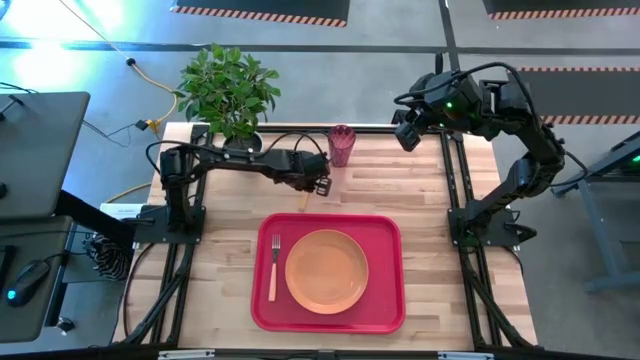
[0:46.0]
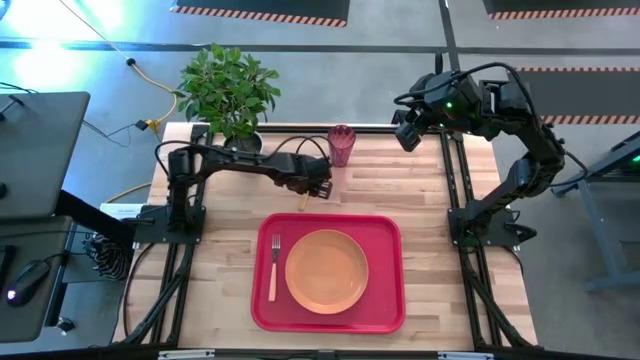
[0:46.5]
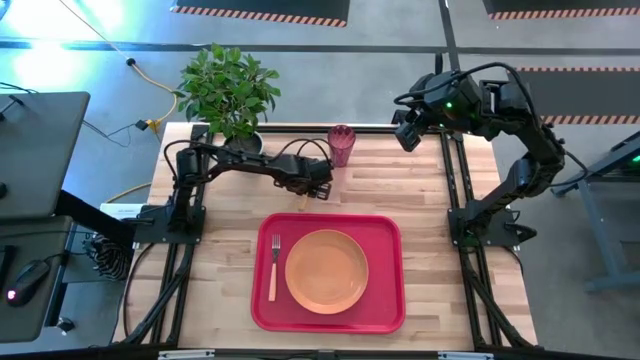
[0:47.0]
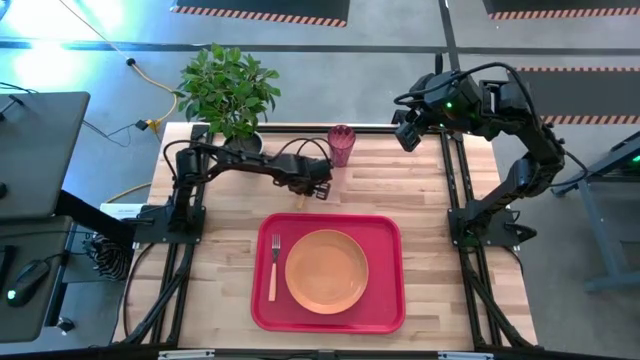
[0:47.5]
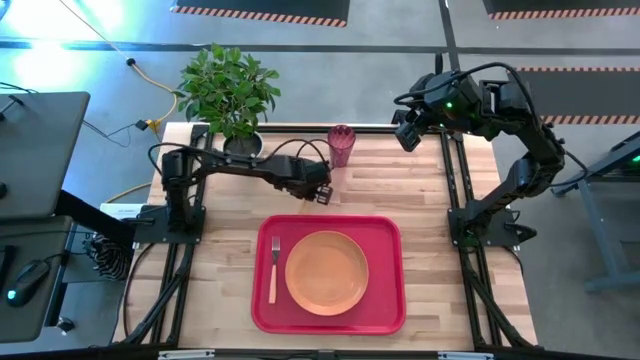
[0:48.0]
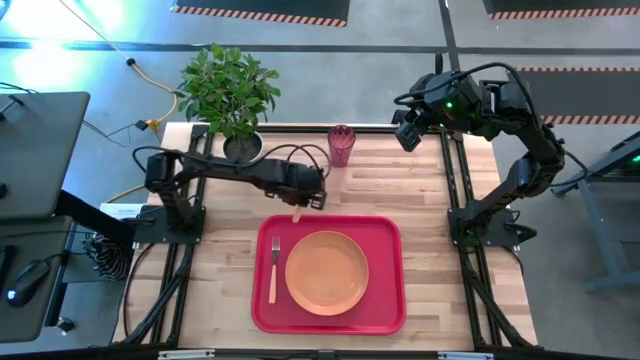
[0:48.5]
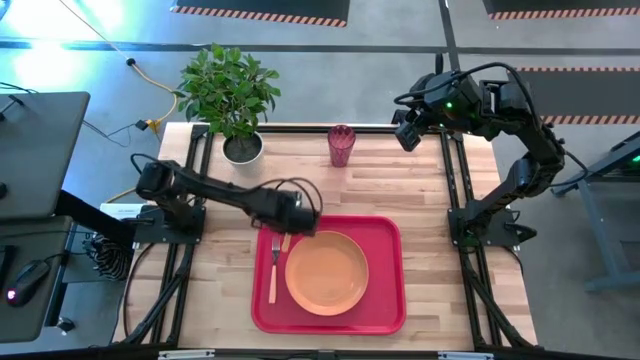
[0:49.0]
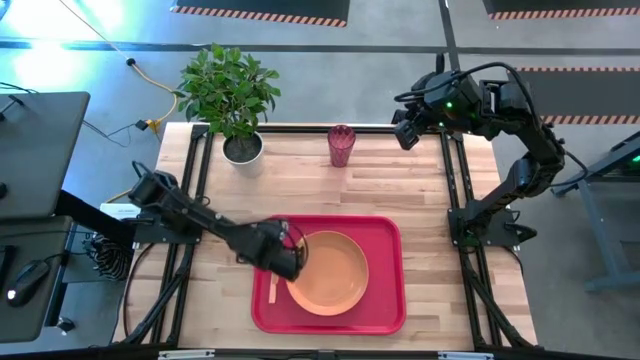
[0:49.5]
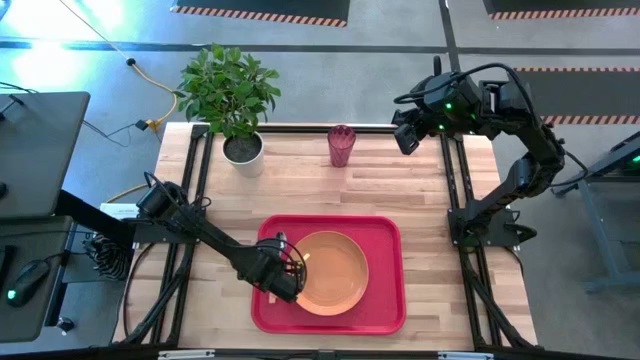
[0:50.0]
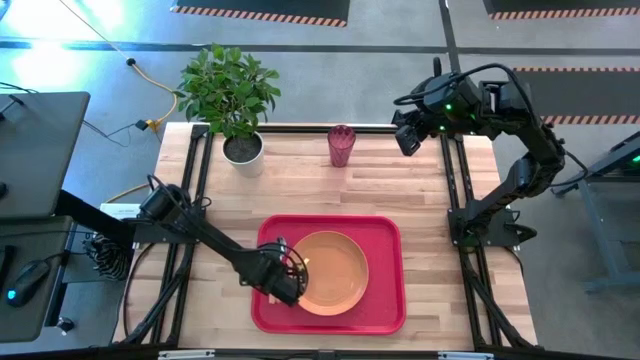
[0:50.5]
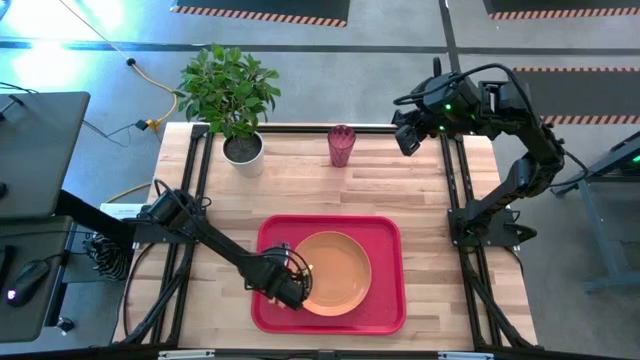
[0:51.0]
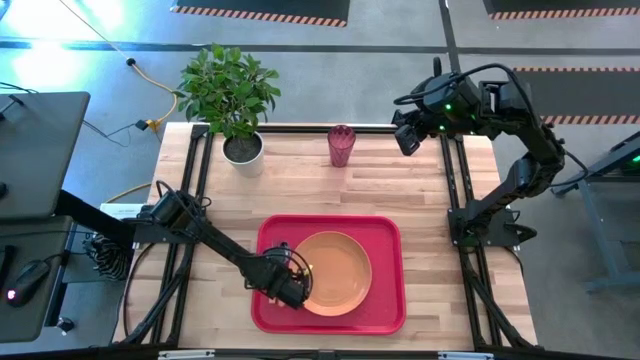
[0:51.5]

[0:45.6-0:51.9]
Task: Pick and place plate/cup/fork/spoon on tray
Put the yellow spoon on the red serving tray between the orange fork and the orange plate

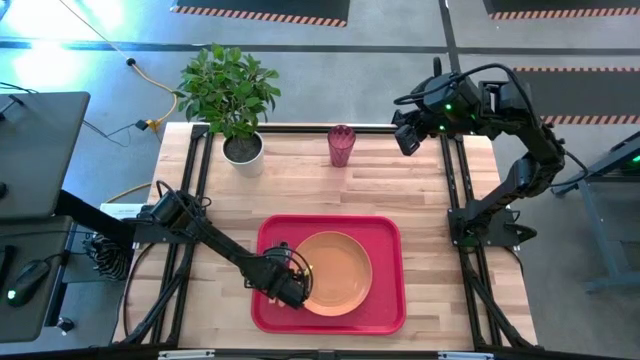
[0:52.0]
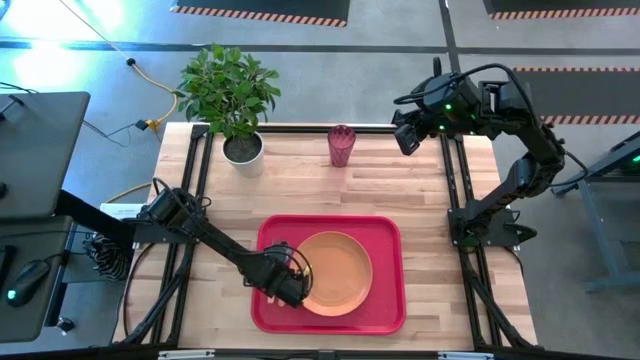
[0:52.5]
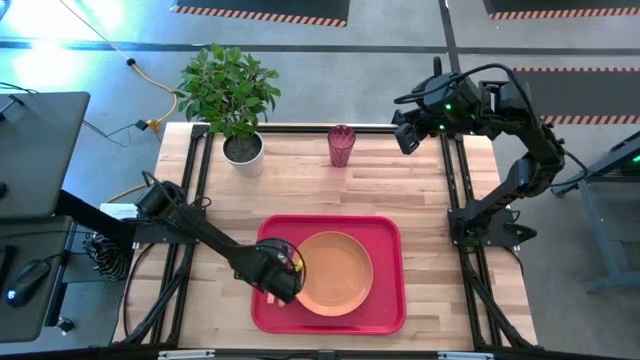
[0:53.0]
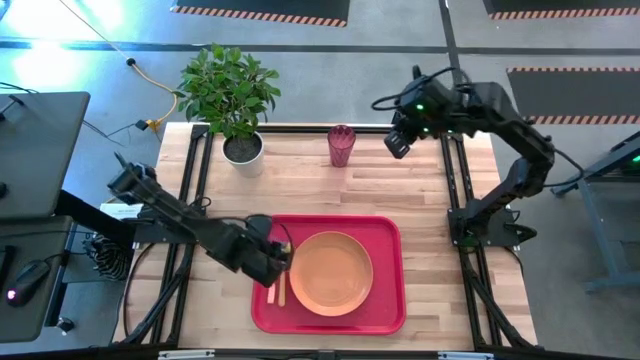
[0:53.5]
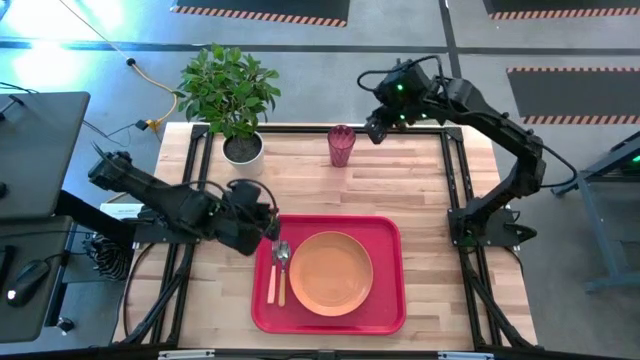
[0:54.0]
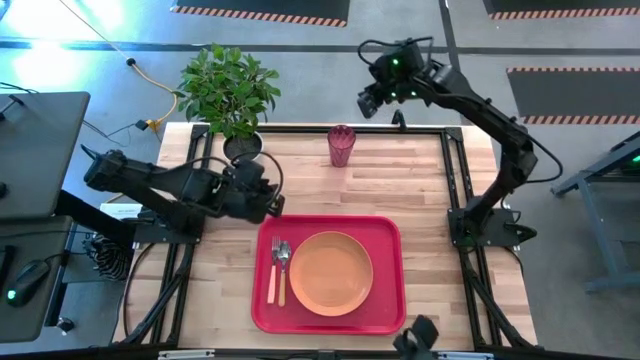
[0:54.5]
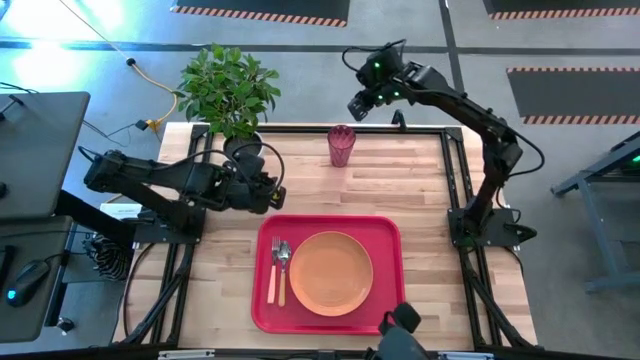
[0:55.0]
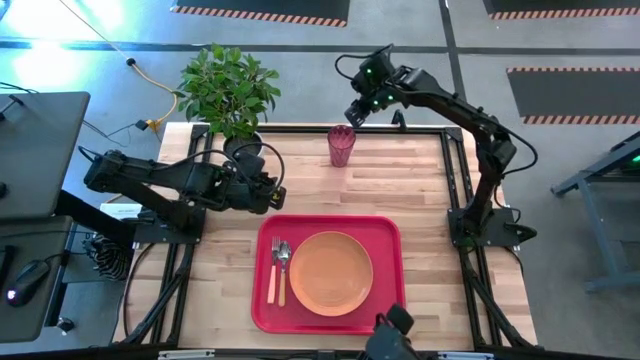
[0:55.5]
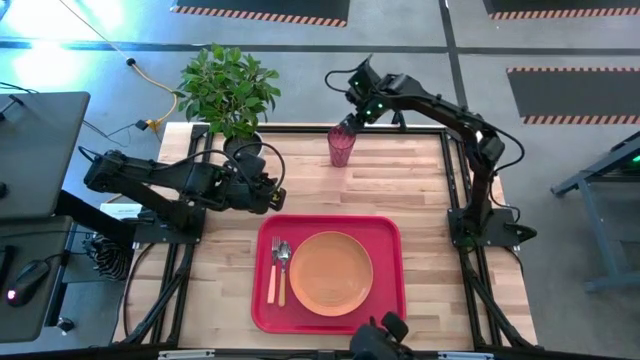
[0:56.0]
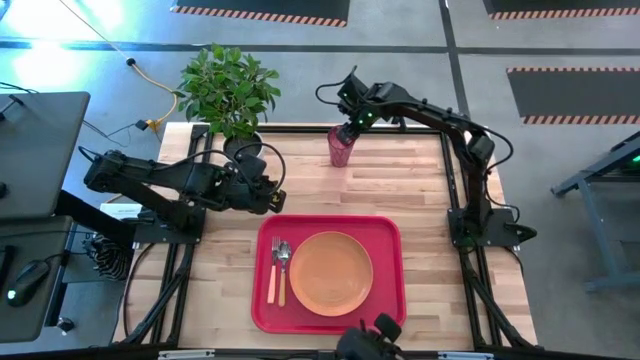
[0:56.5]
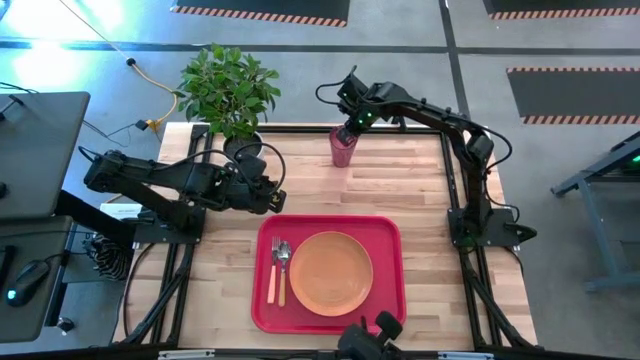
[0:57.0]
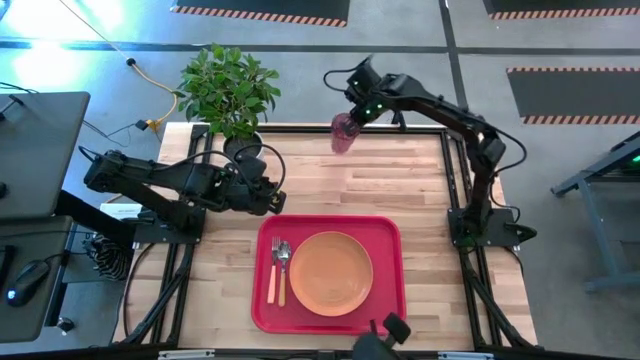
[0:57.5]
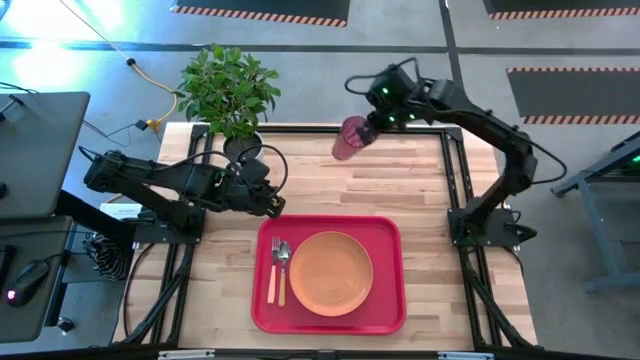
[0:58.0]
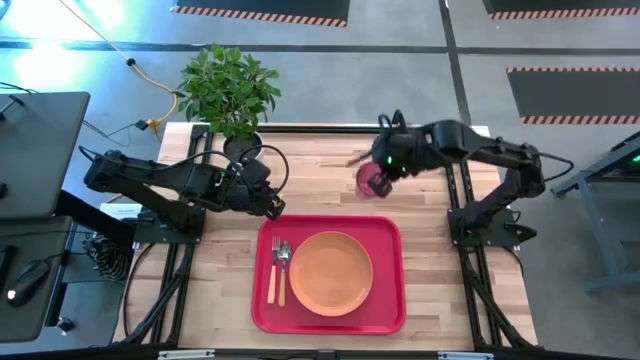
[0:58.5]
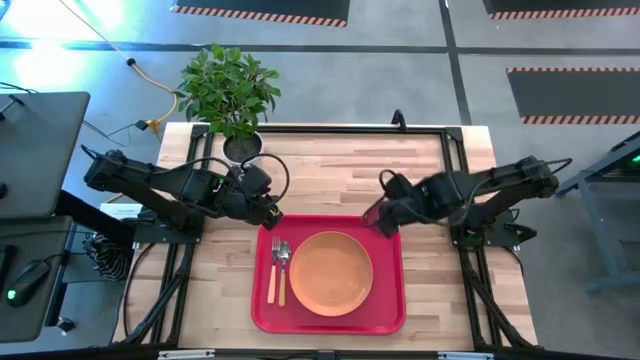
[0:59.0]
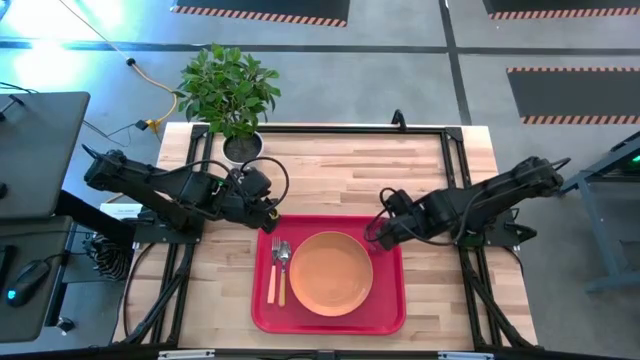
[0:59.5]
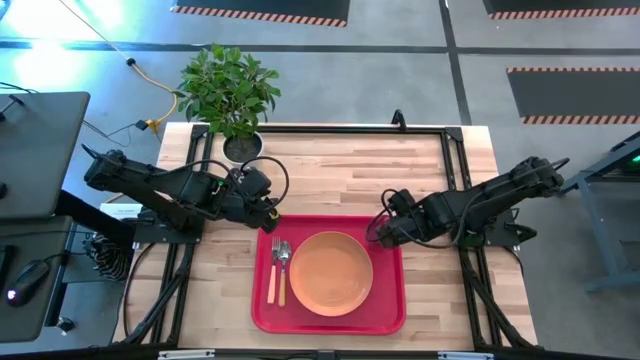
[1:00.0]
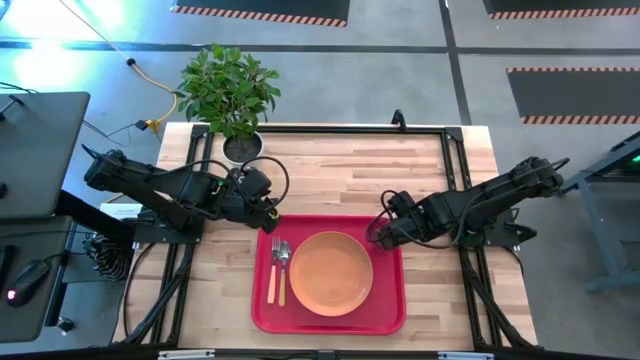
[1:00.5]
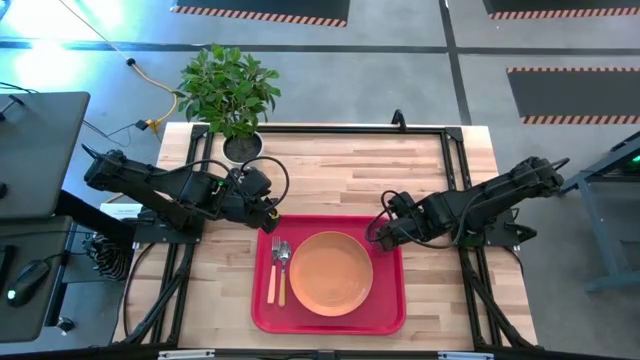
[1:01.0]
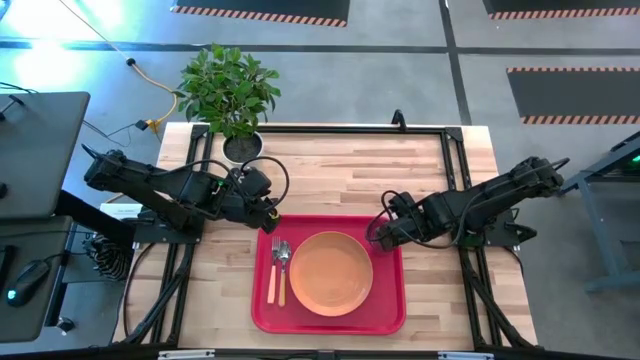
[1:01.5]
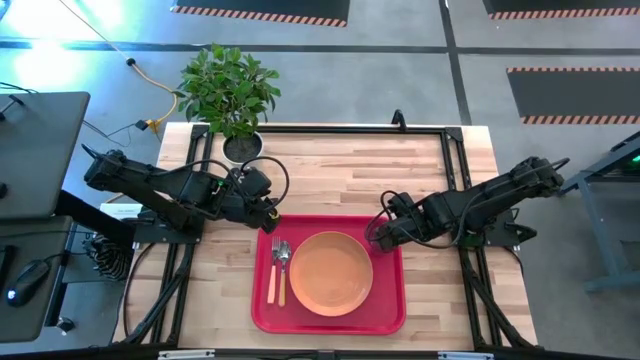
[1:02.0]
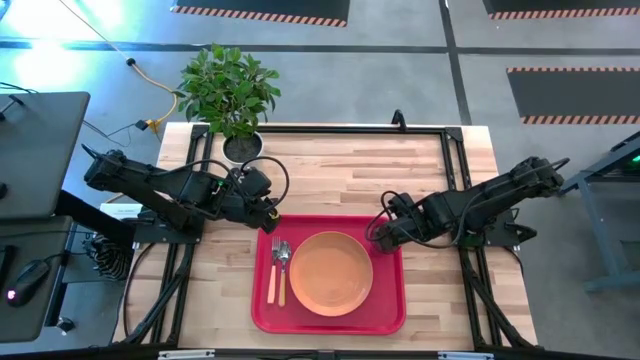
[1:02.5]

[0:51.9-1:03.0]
Put the red cup on the red serving tray to the top right of the orange plate

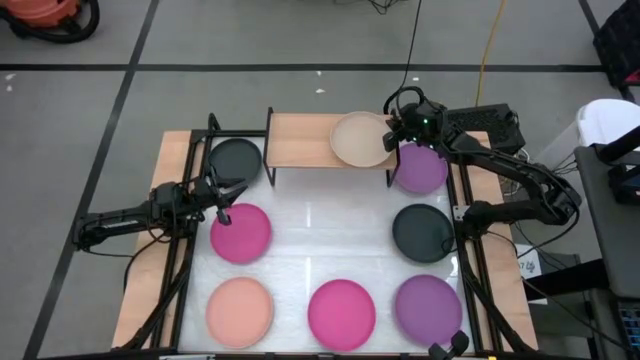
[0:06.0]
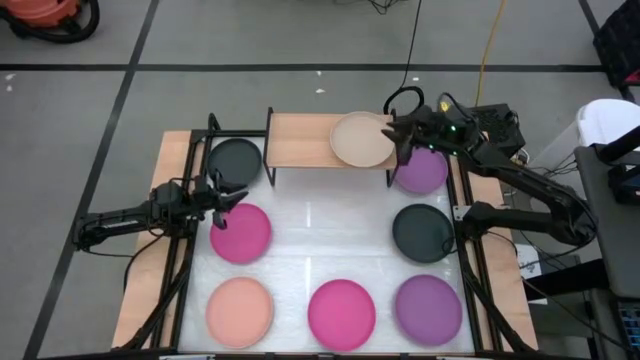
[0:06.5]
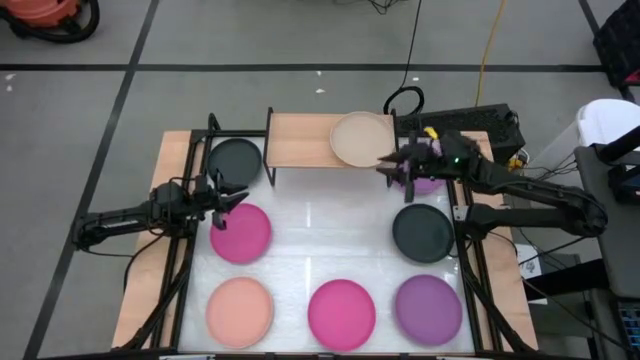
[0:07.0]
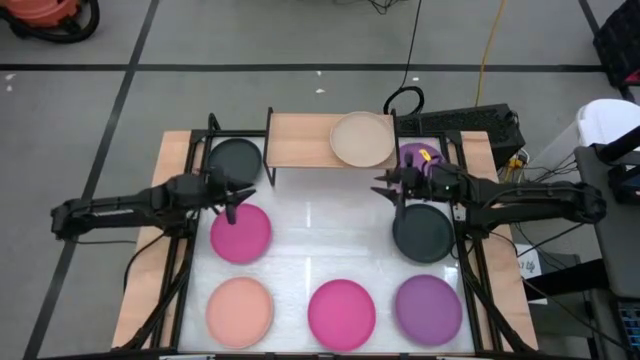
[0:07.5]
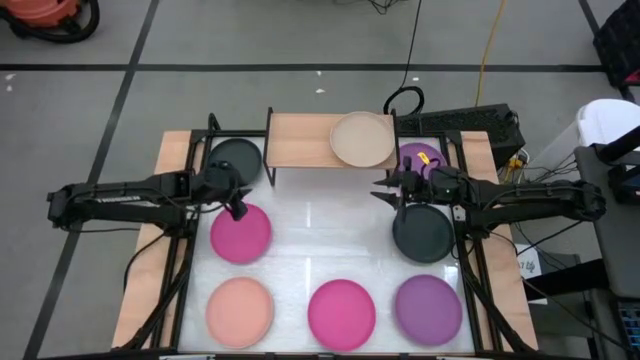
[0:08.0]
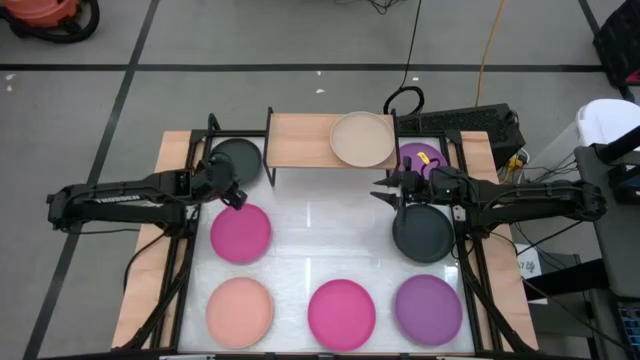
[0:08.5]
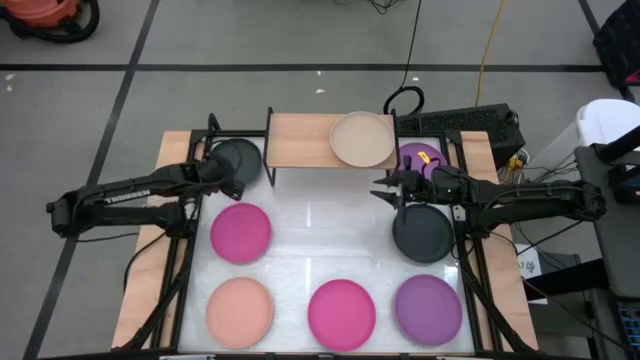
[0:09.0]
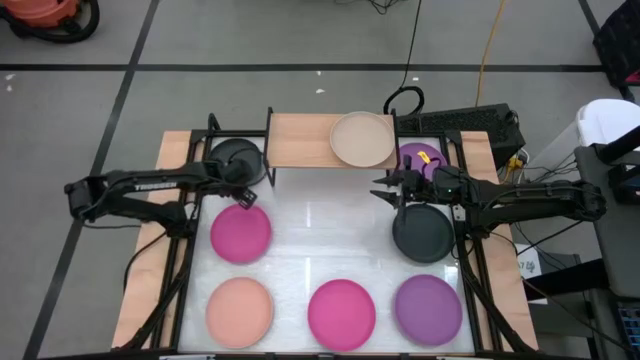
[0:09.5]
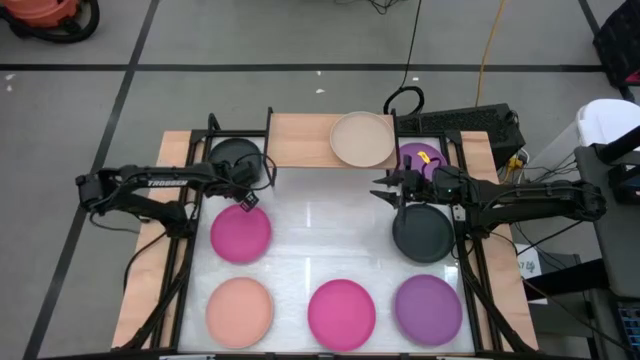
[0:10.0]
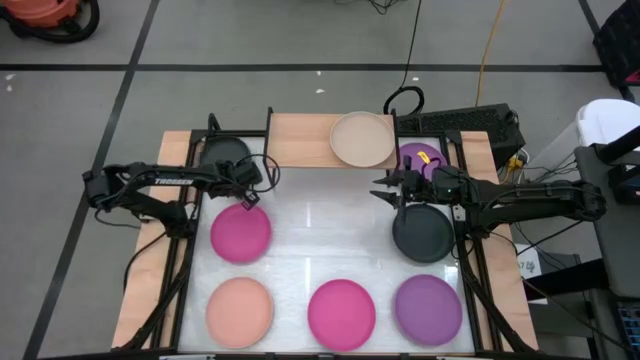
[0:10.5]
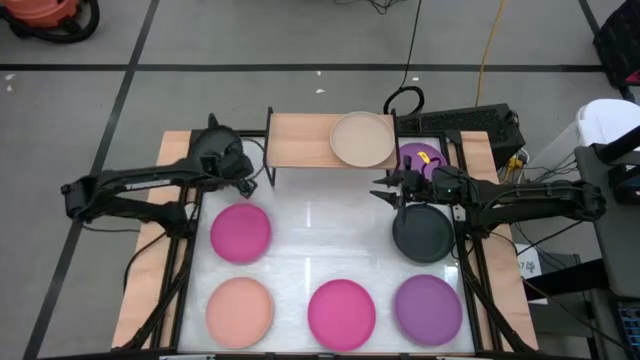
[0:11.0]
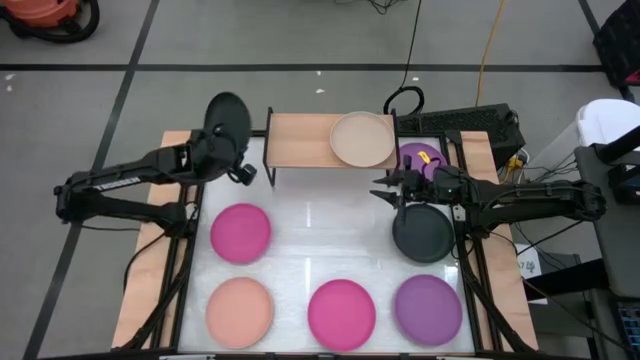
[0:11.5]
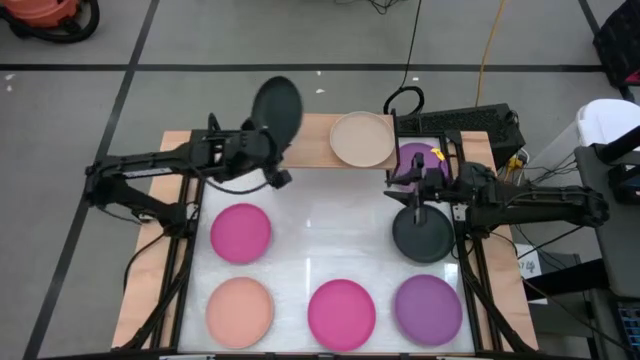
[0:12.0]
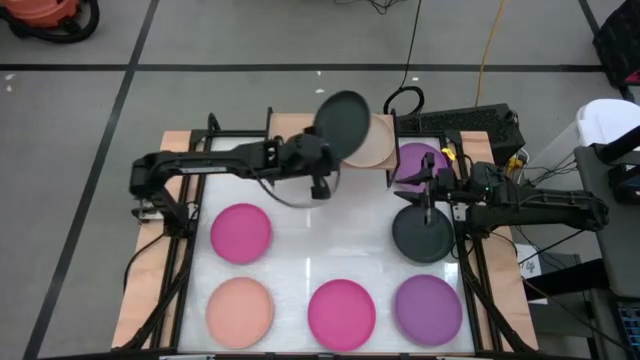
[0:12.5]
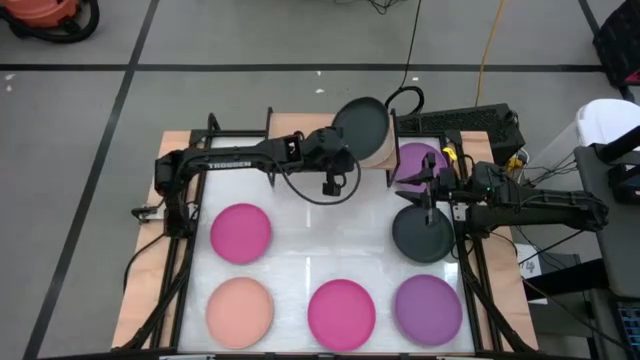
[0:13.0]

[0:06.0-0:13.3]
Task: Place and stack plates onto a shelf
Stack the left black plate on the gray plate on the shelf
